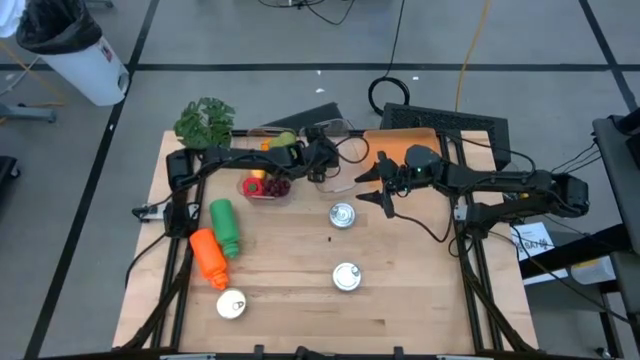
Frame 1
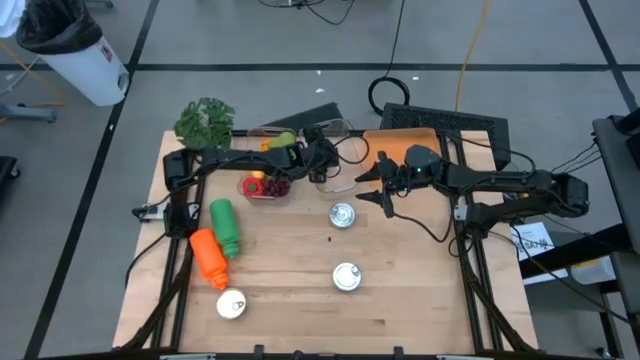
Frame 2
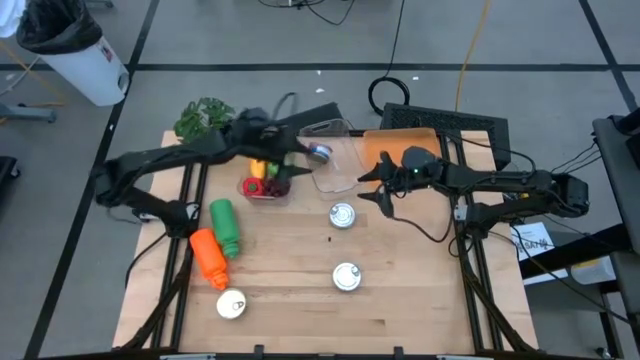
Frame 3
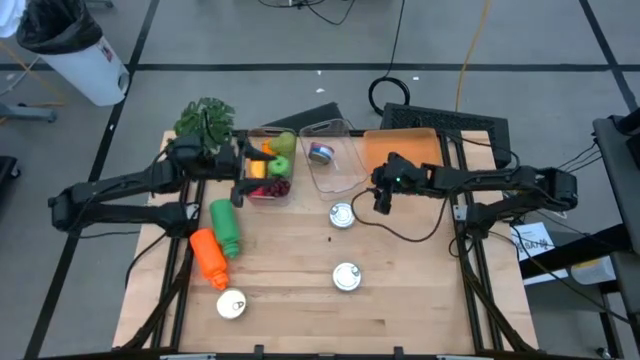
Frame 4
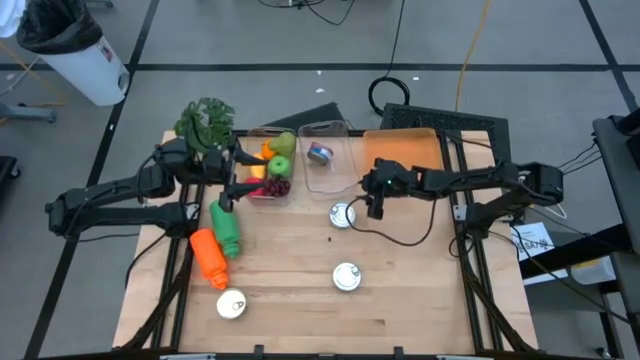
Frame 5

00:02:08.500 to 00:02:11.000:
Task: Pick & Place Food Item
Adjust the right transparent bin

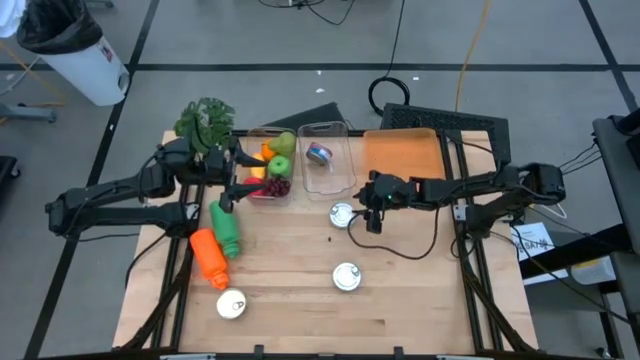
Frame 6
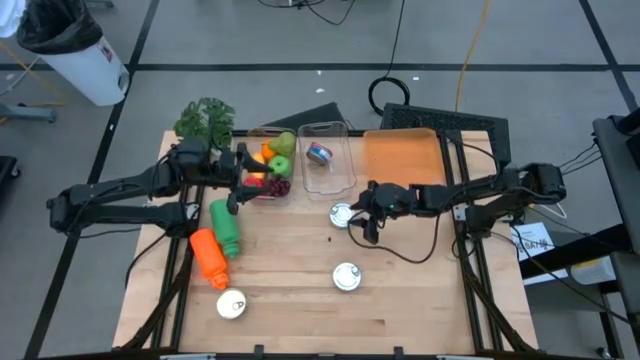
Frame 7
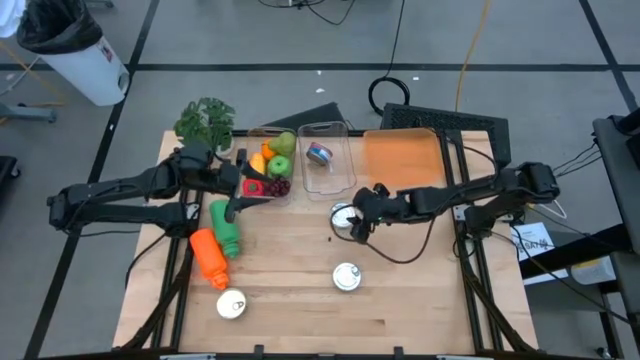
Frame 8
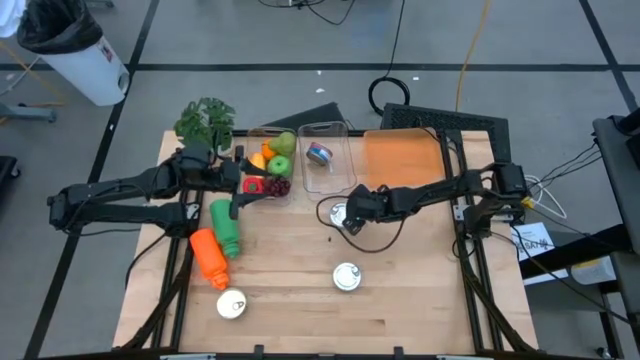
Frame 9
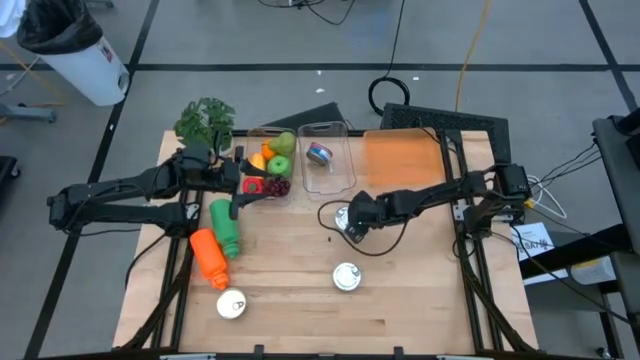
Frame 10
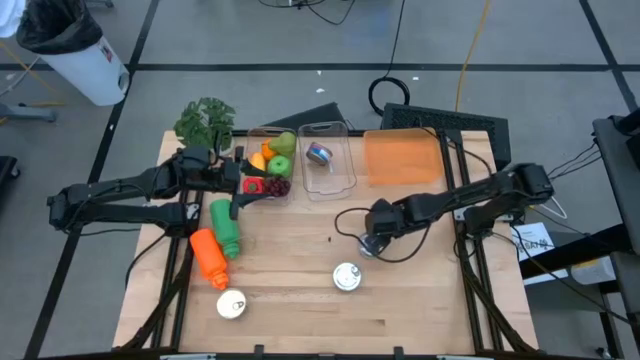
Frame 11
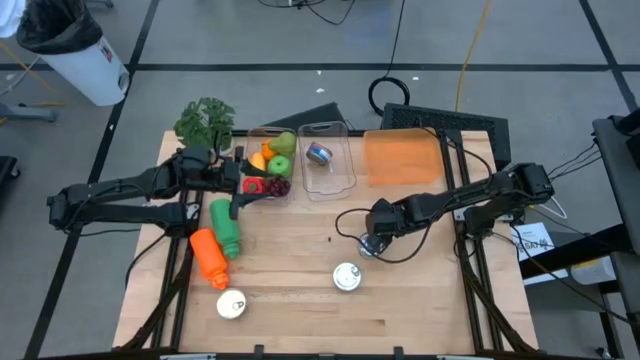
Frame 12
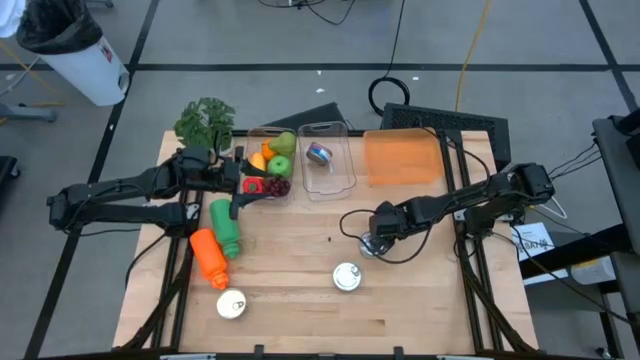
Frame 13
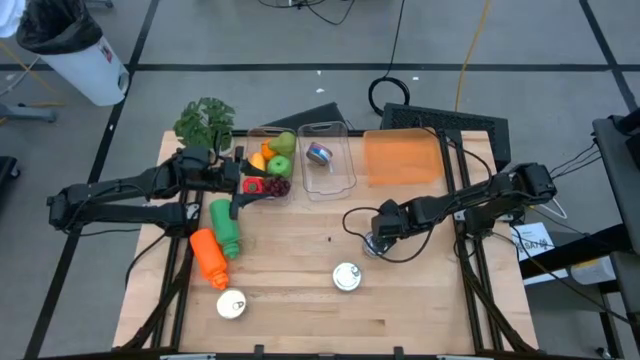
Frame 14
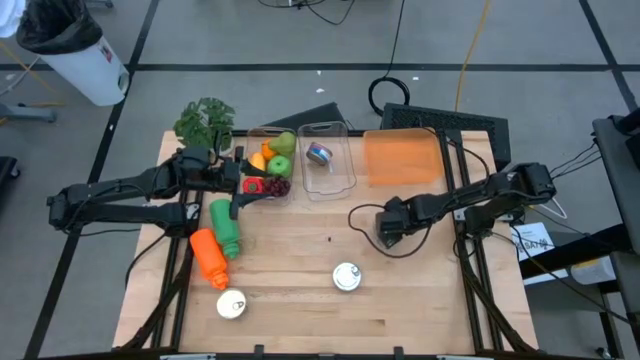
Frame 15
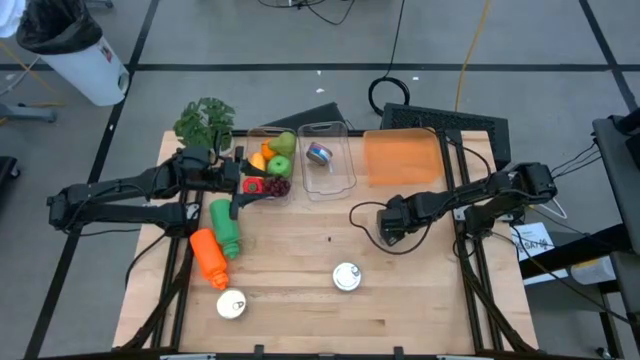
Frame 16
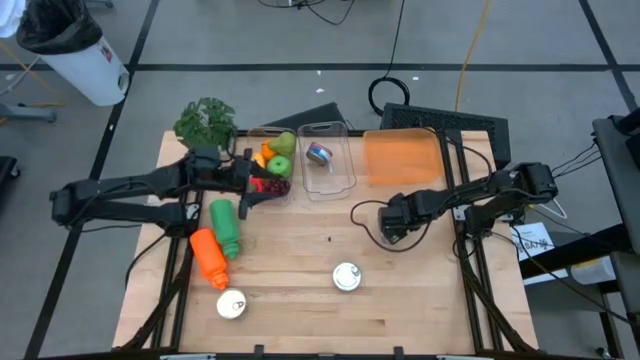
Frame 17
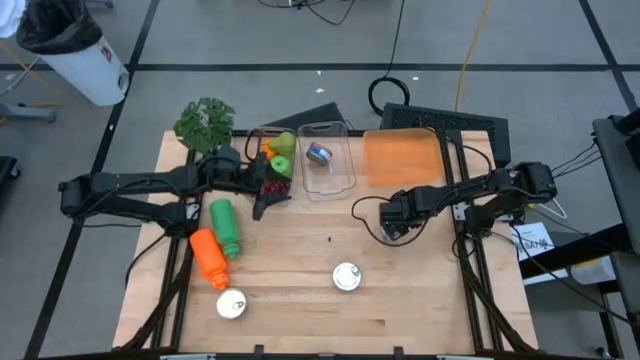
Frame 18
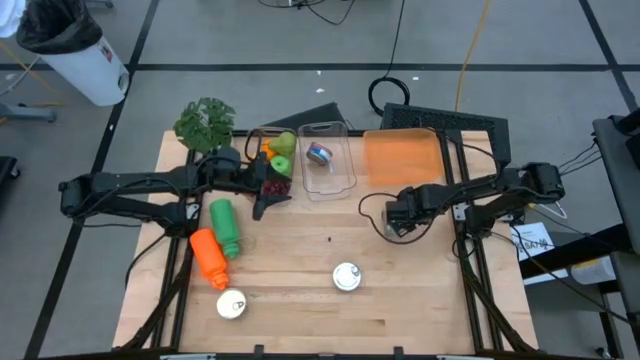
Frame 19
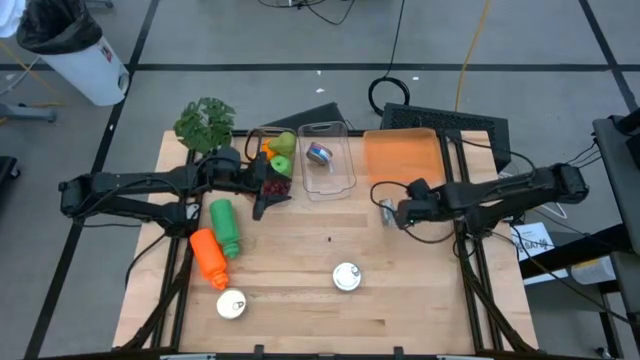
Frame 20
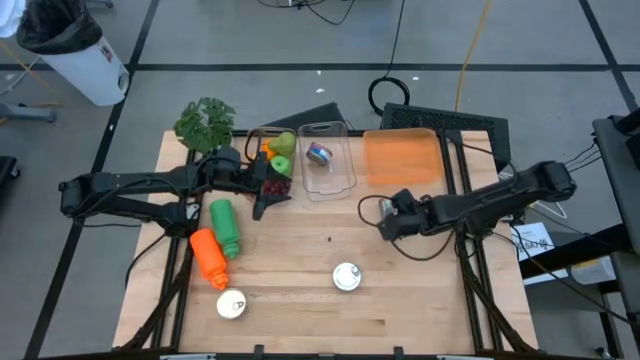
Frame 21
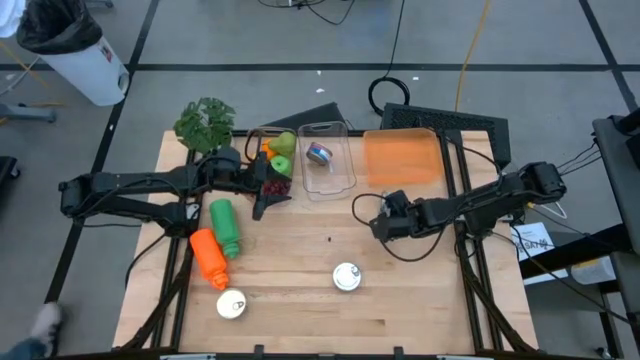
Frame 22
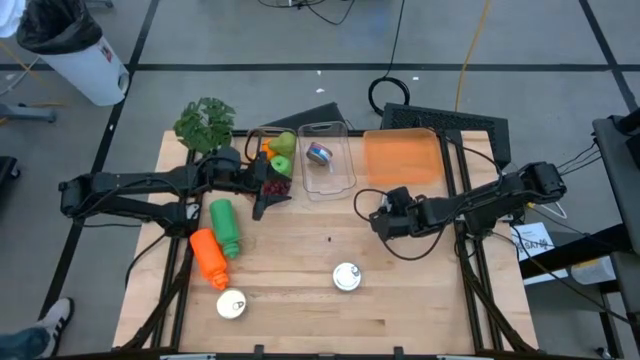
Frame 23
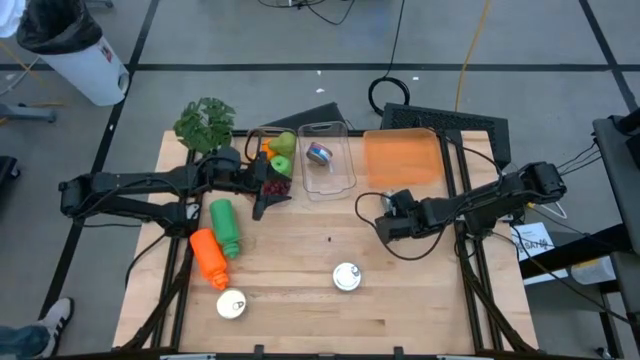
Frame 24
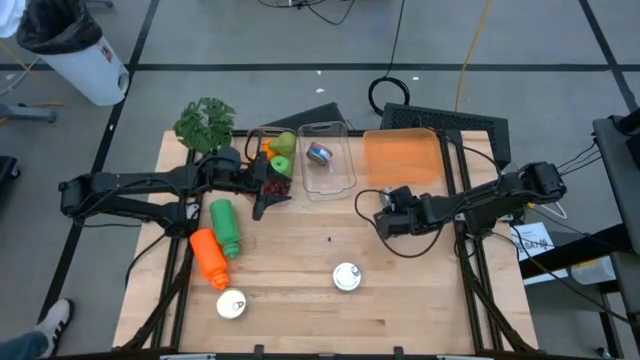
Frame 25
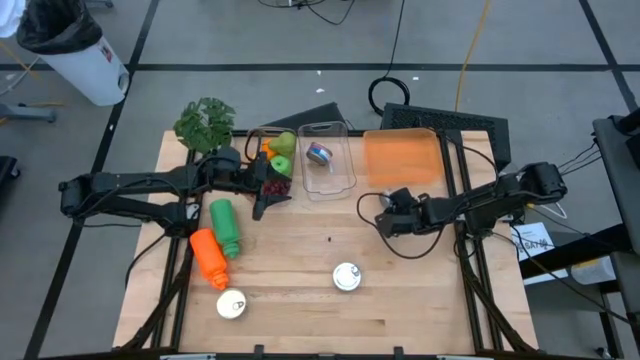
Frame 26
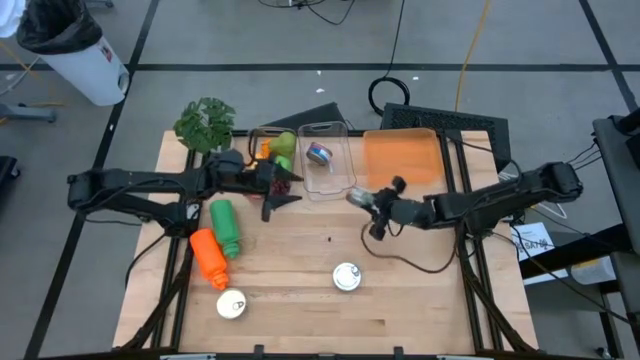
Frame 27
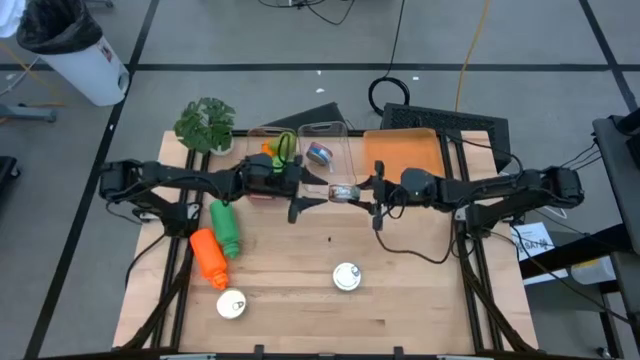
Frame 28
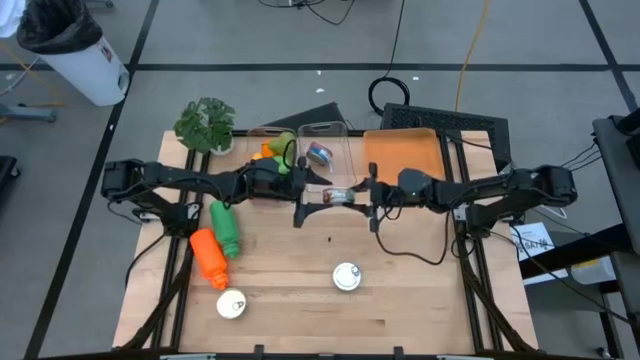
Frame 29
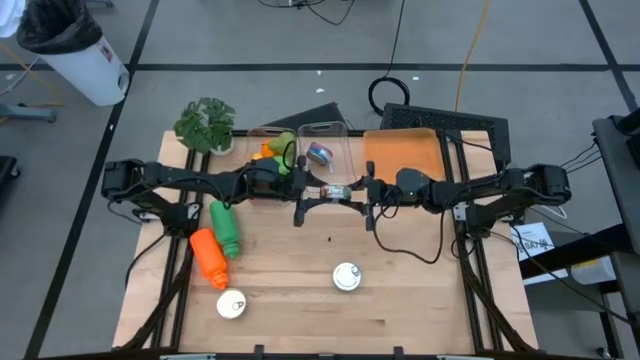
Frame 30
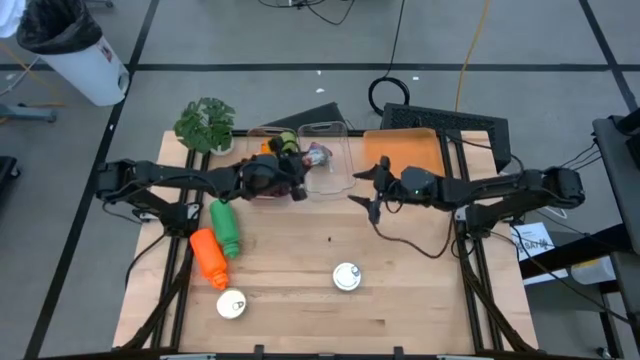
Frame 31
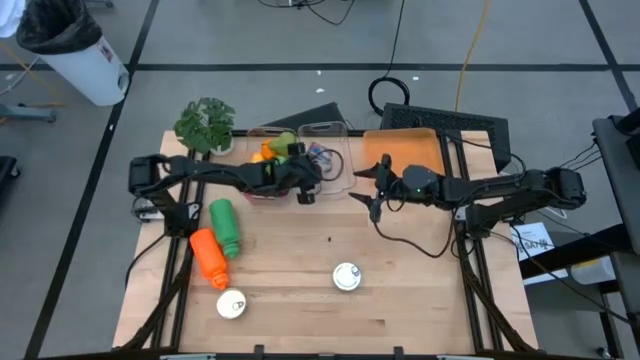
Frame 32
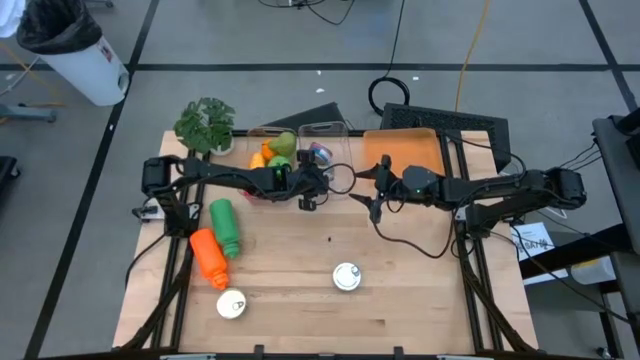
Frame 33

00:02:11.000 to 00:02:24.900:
Put the right green tuna can into the right transparent bin

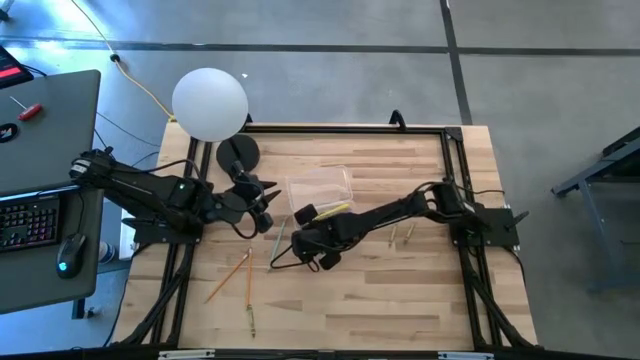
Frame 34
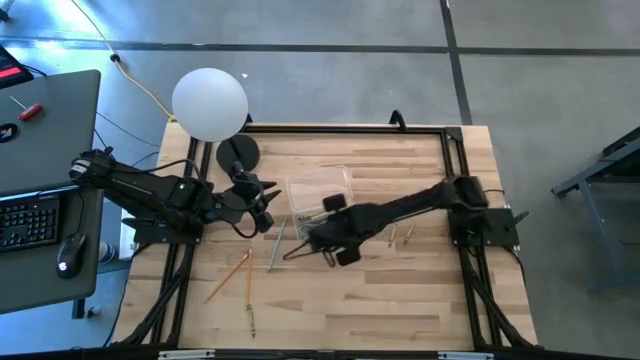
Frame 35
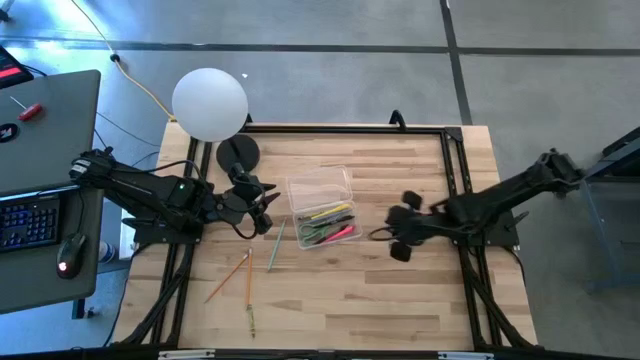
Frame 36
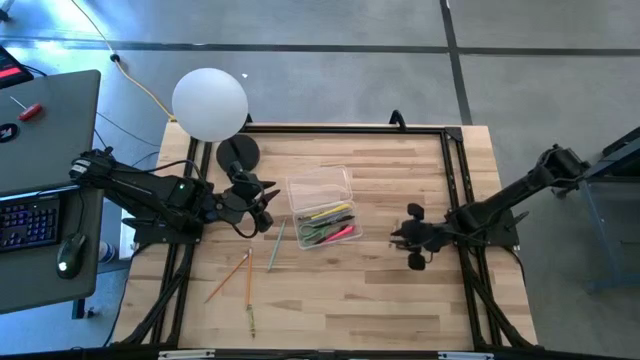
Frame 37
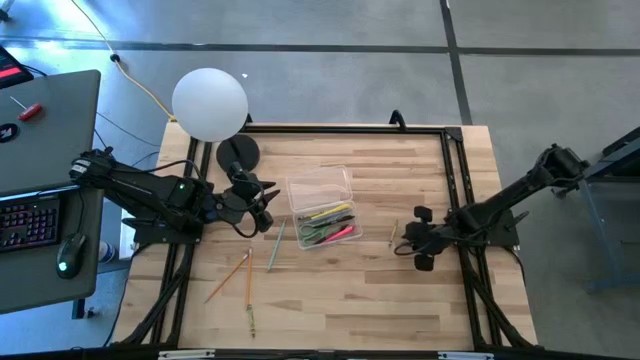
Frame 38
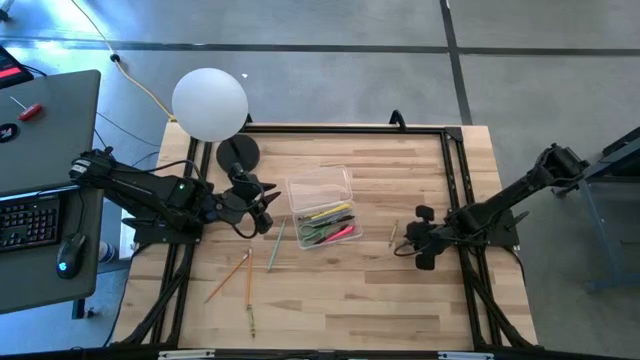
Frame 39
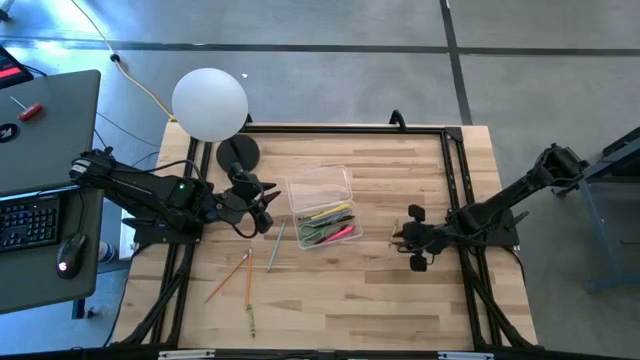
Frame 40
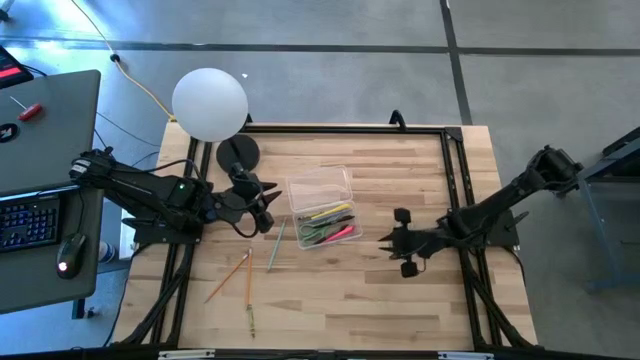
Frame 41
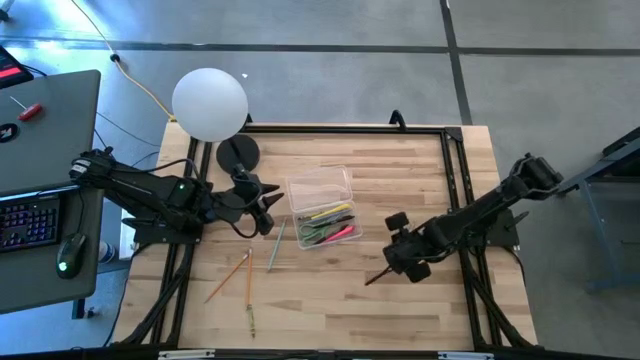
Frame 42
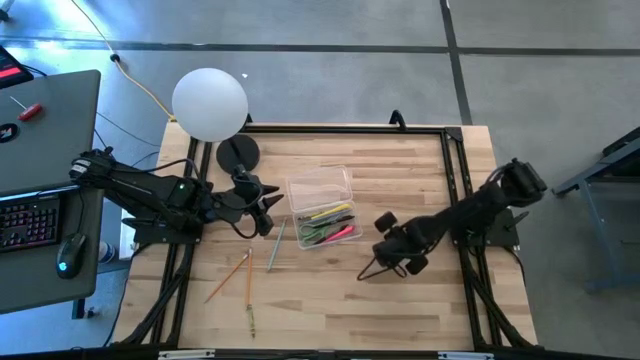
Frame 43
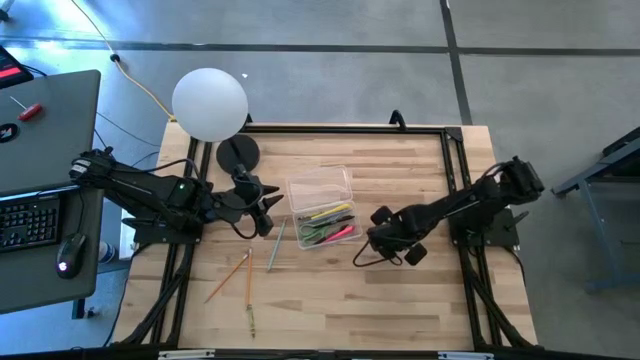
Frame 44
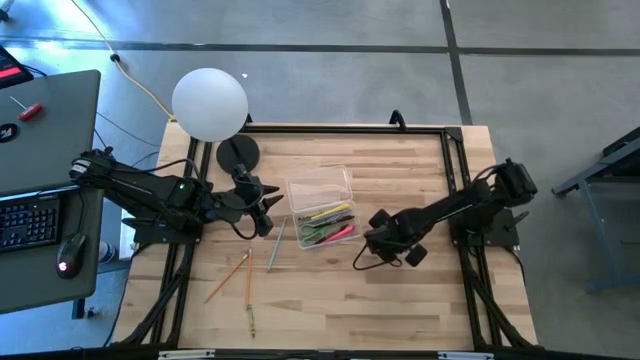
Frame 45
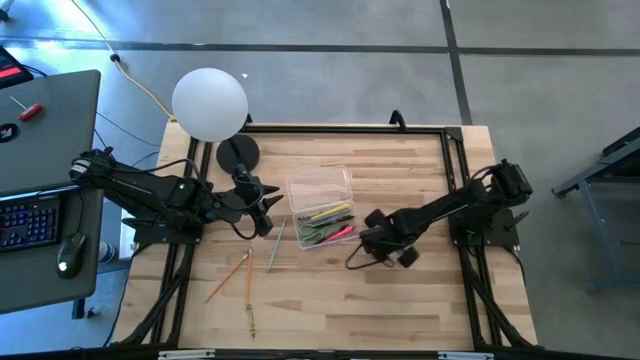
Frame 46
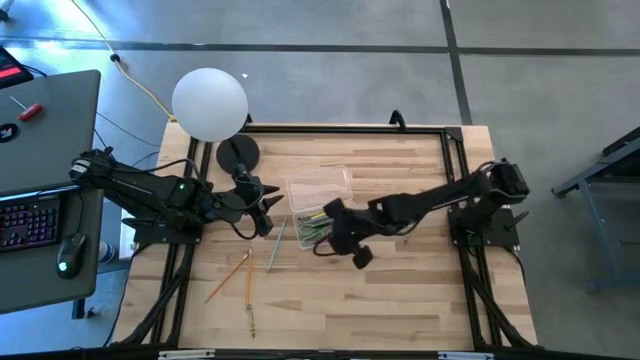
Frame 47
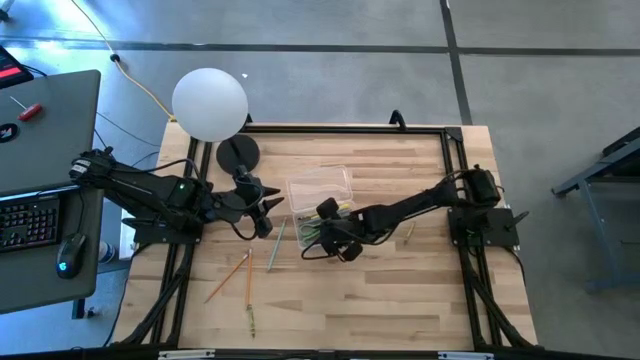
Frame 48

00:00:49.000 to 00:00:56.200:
Task: Pick & place school supplies into a supply box
Put the green crayon into the transparent supply box
